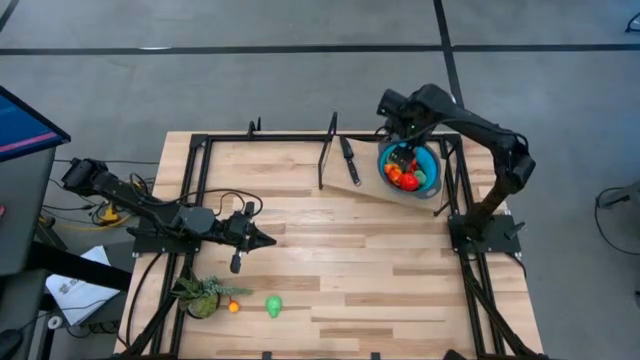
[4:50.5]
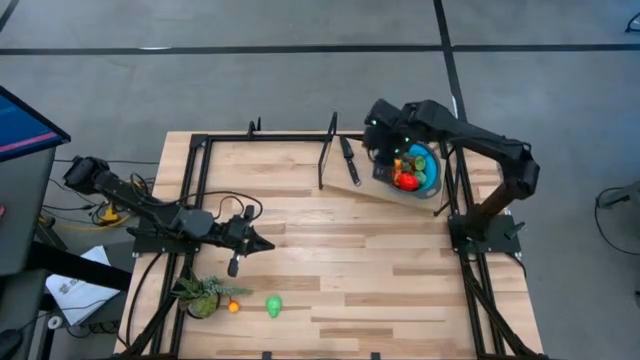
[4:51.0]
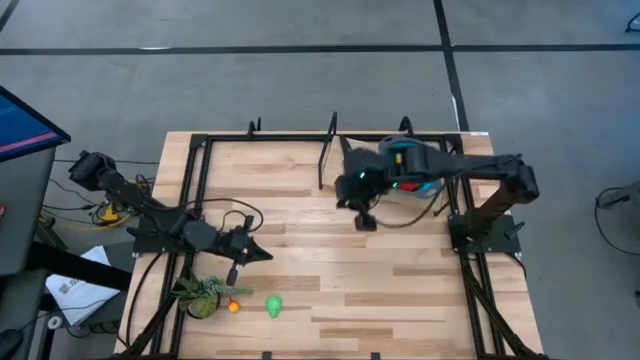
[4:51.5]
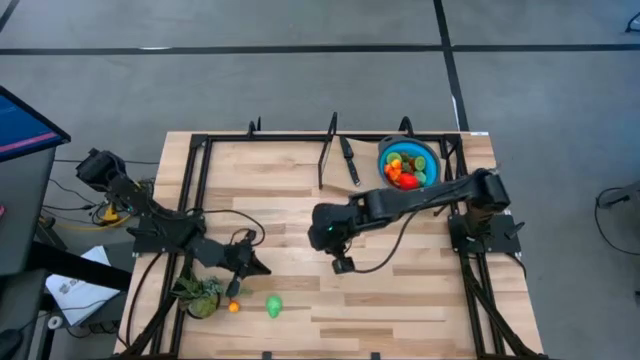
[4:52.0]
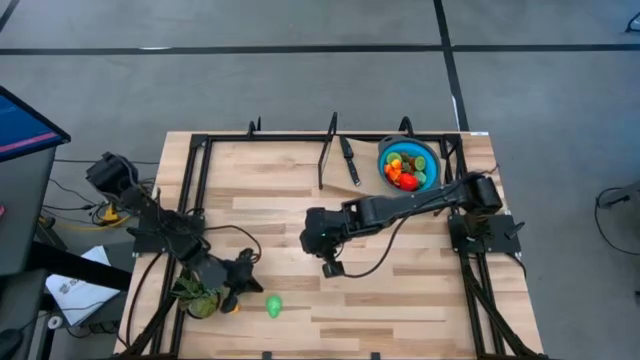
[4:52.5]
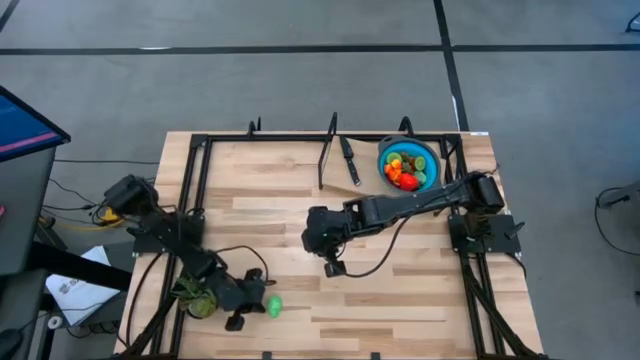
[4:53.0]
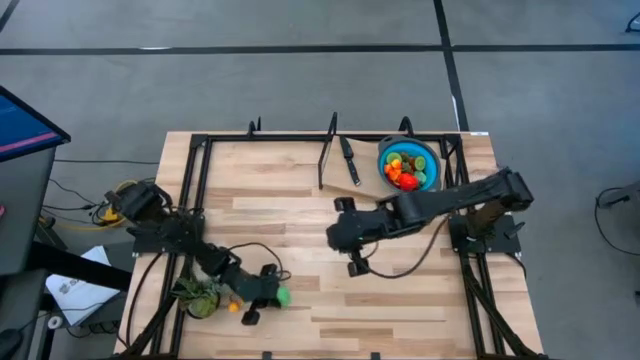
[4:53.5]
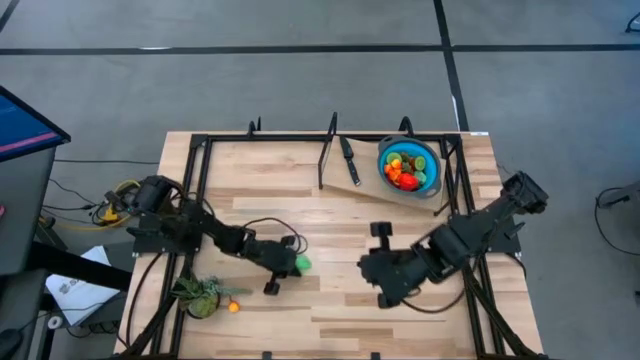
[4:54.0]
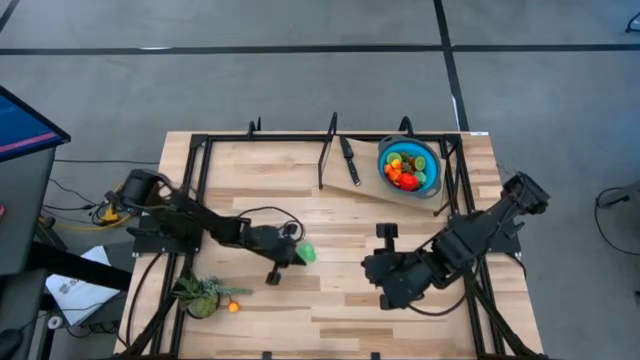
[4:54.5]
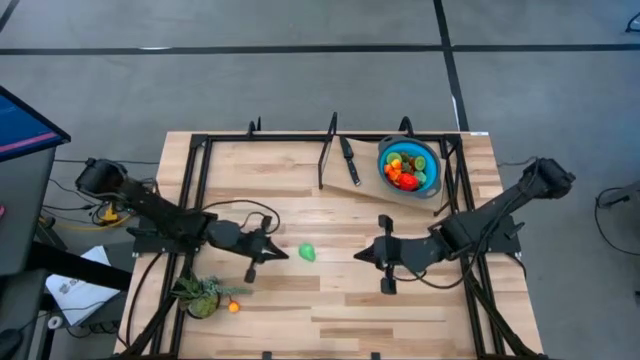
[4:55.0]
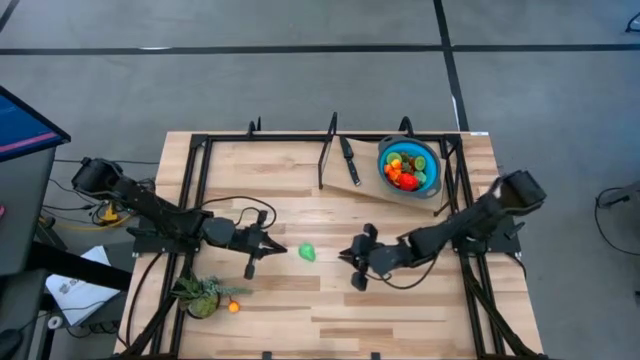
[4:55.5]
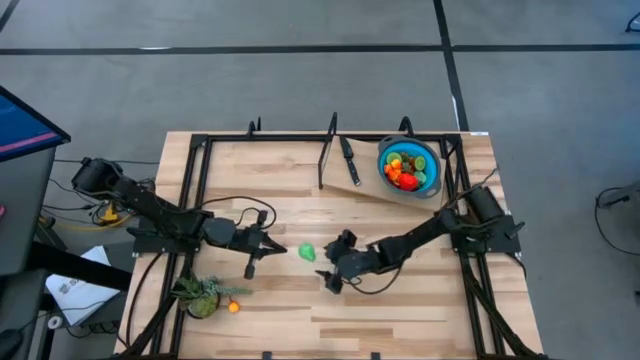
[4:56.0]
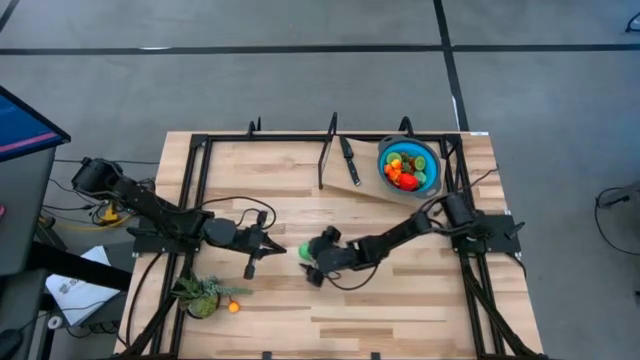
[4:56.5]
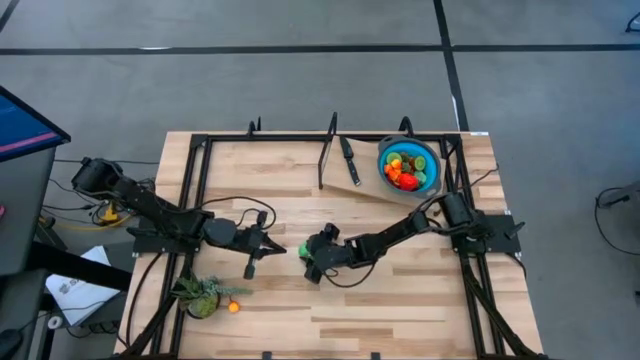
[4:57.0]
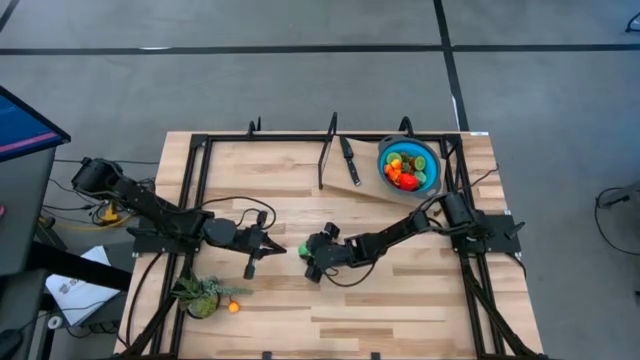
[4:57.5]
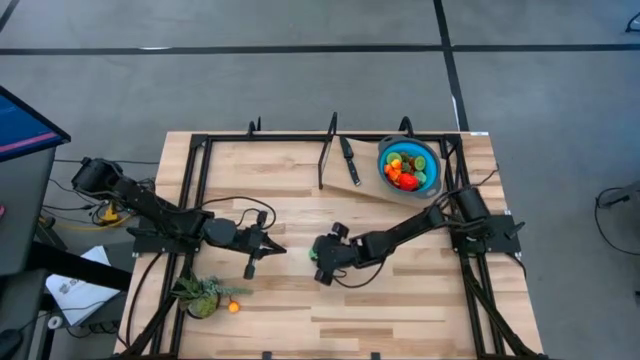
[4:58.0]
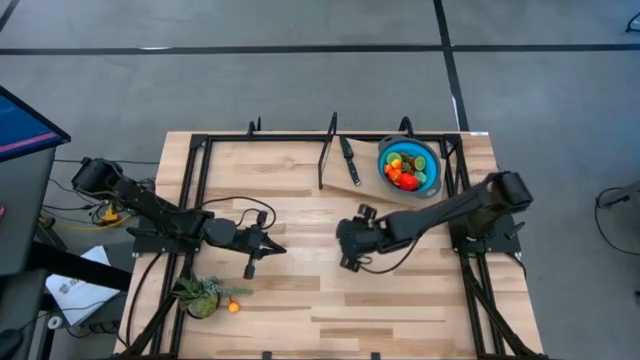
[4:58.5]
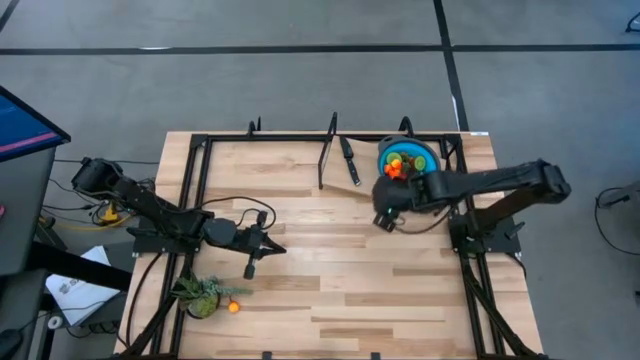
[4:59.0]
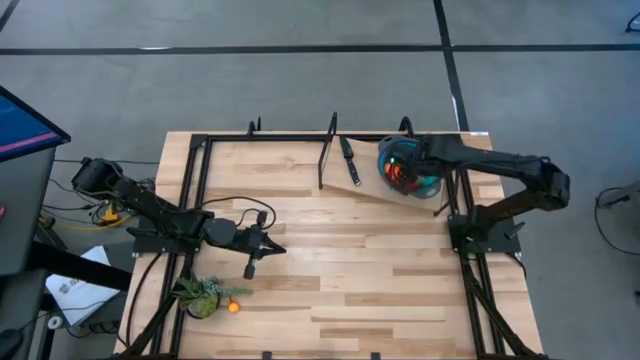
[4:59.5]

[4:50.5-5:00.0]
Task: Pick & Place Fruit
Put the half green pear into the blue colander

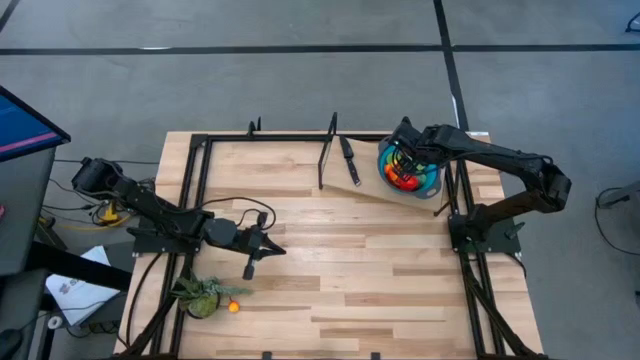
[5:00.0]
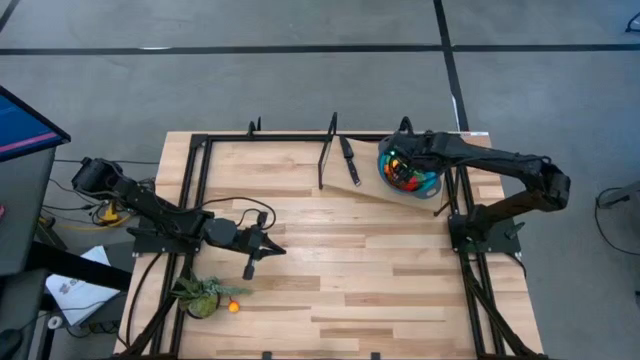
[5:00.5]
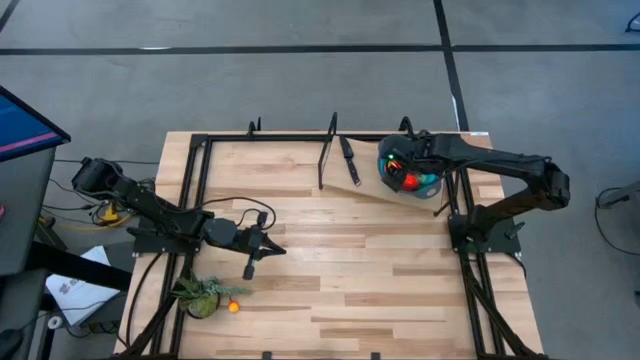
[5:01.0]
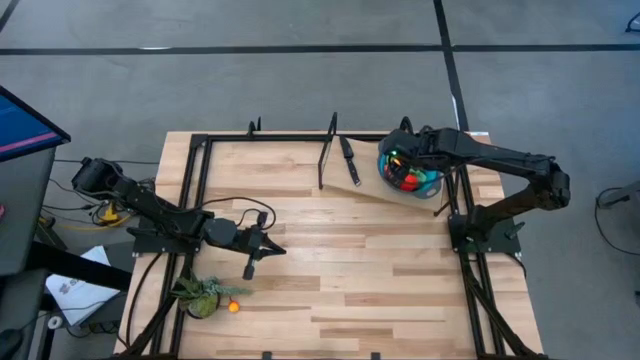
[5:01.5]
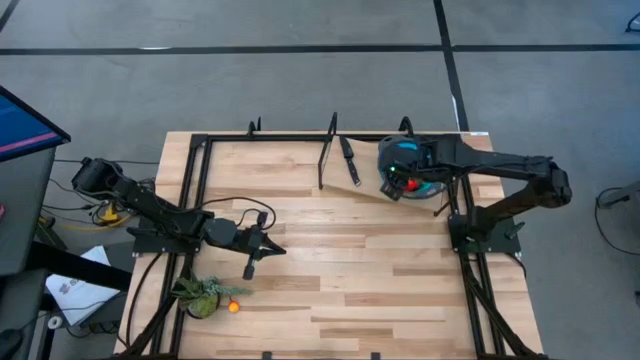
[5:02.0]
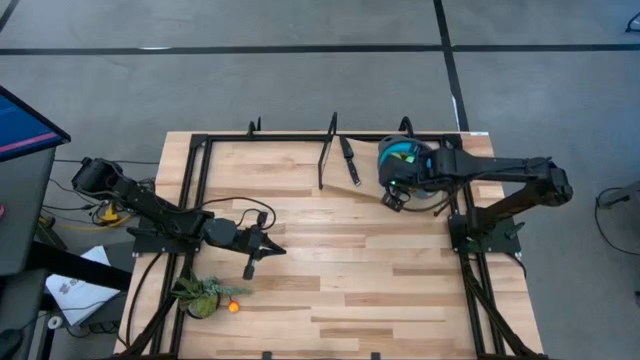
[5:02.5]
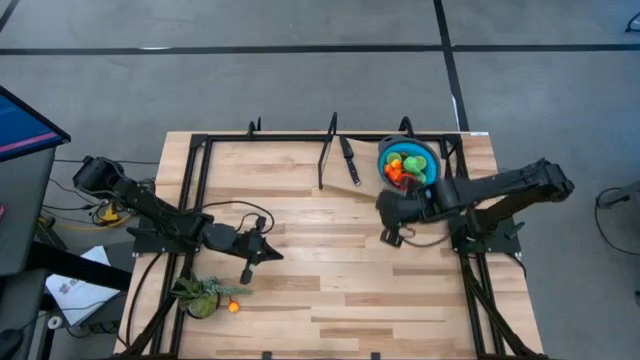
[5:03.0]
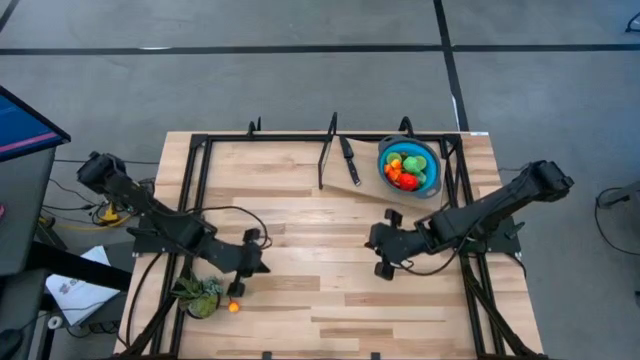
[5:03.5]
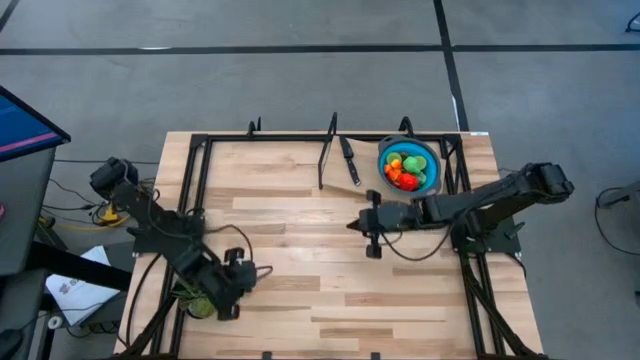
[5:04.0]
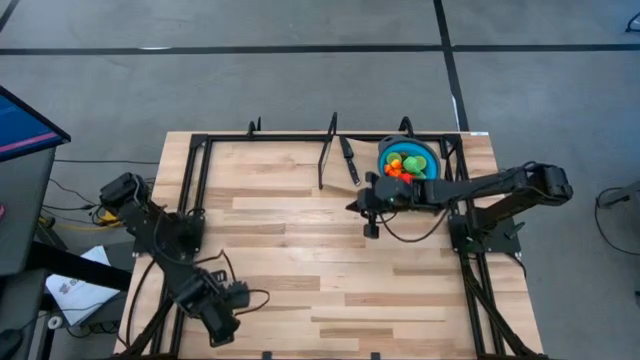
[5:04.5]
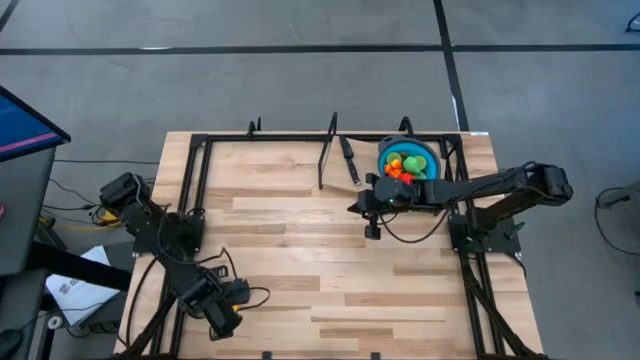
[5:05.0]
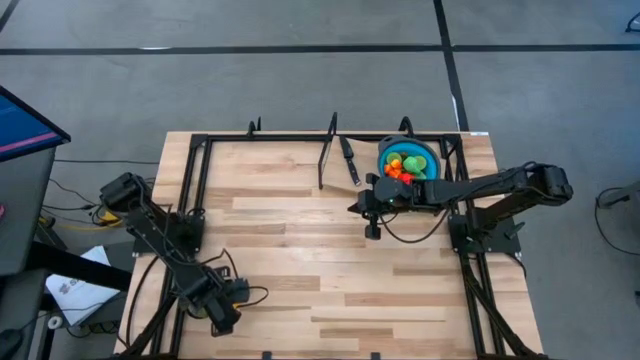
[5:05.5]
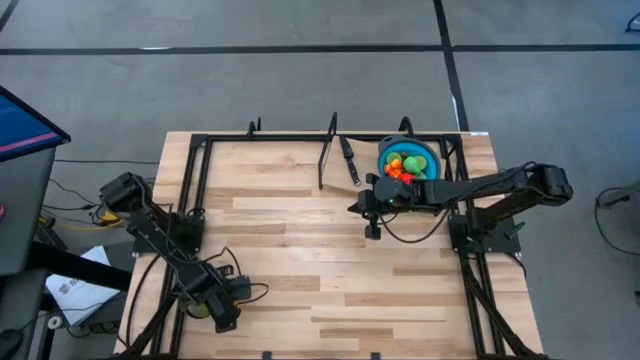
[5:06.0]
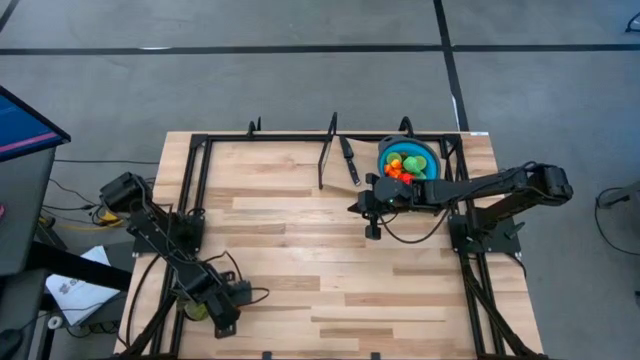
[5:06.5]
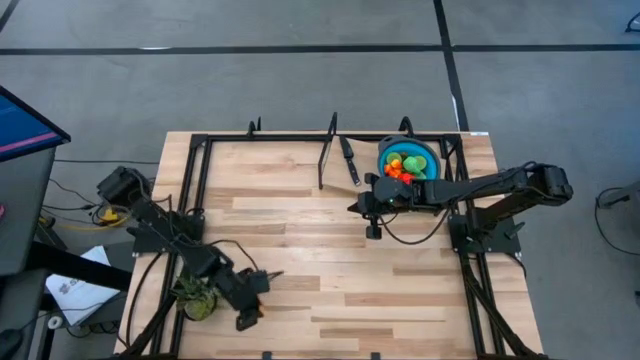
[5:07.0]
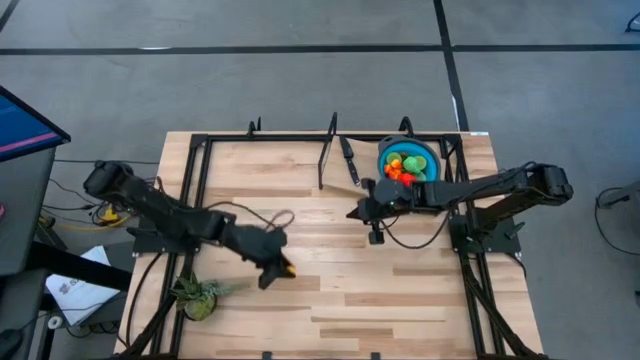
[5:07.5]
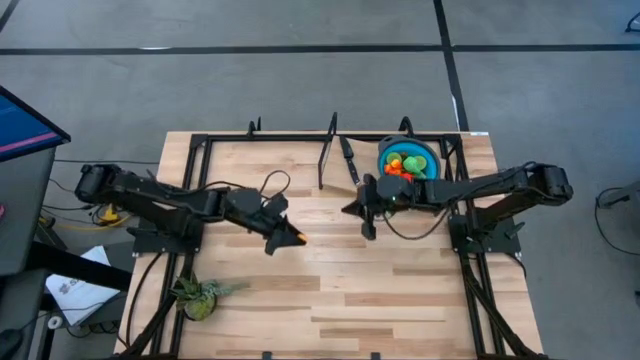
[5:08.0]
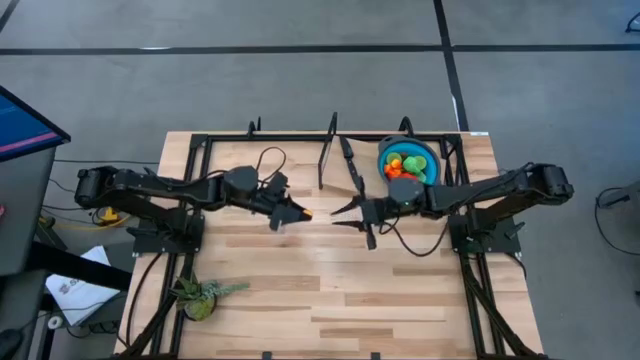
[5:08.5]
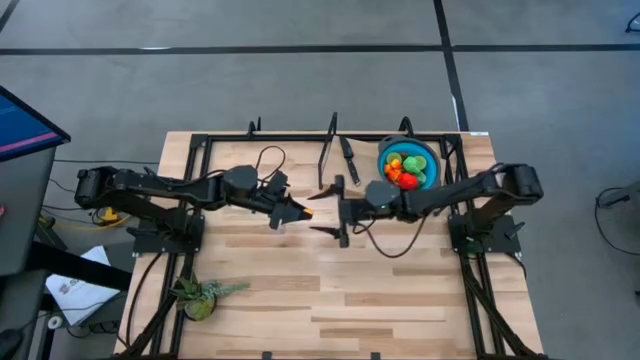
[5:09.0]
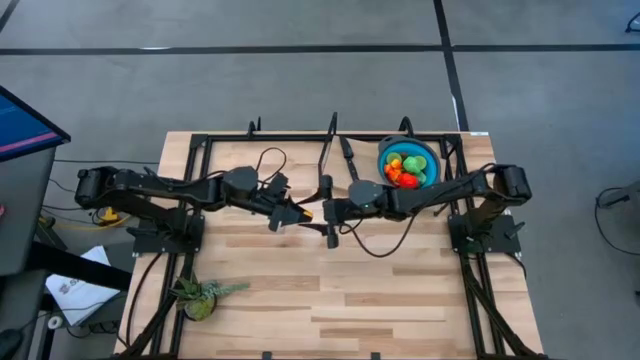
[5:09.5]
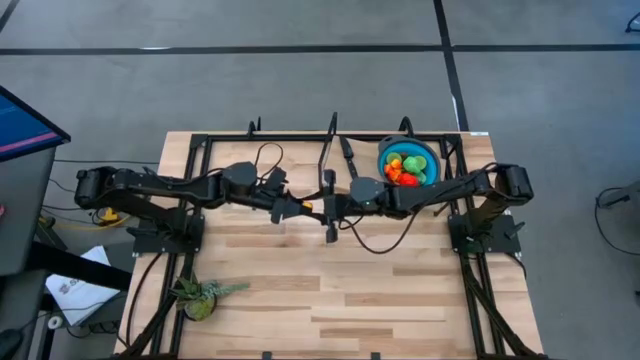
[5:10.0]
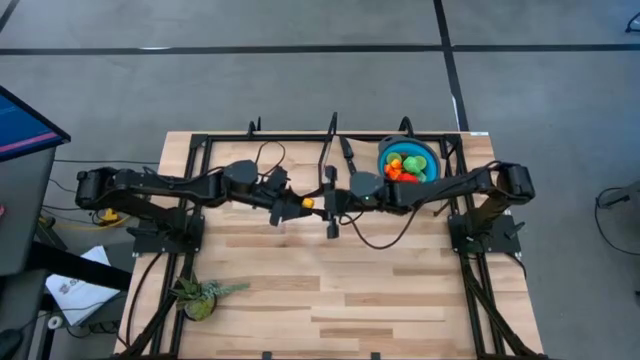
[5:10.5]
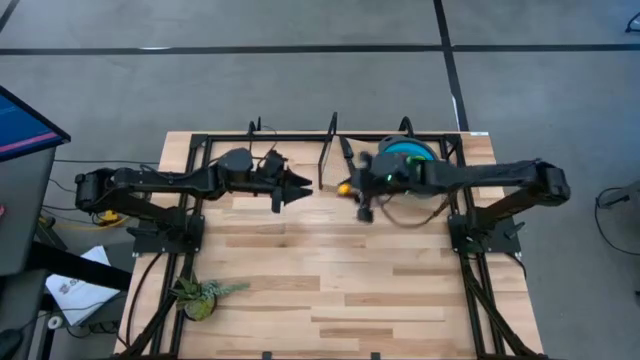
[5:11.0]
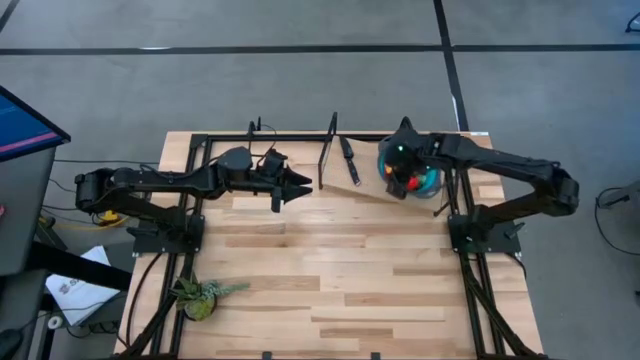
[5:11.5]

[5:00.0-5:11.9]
Put the orange pear into the blue colander
